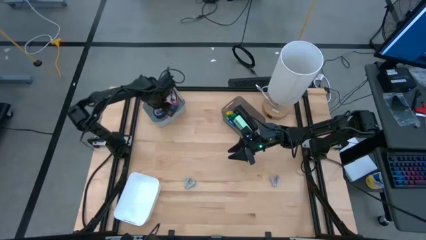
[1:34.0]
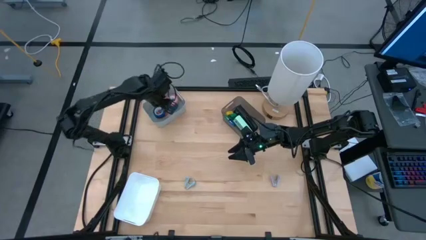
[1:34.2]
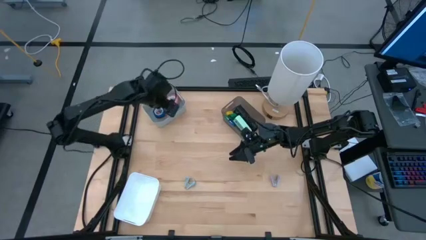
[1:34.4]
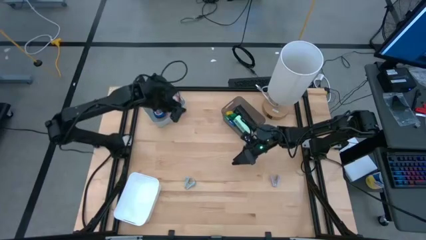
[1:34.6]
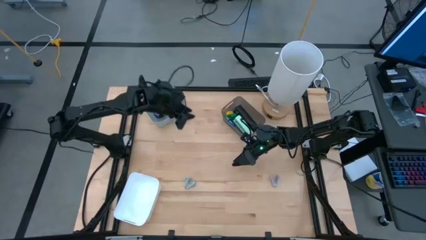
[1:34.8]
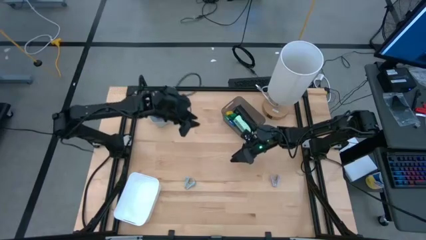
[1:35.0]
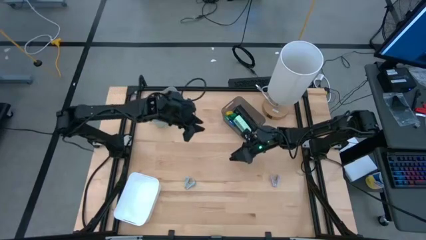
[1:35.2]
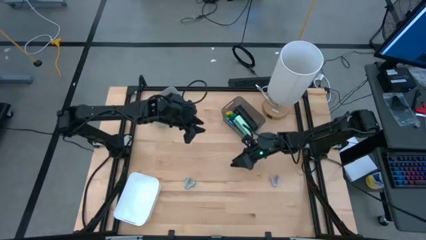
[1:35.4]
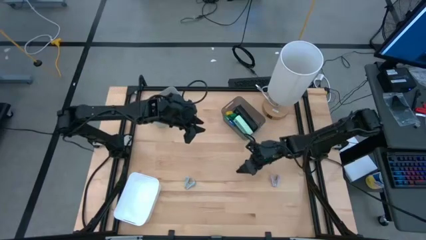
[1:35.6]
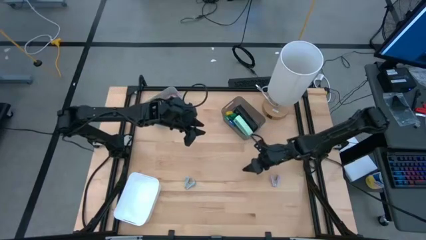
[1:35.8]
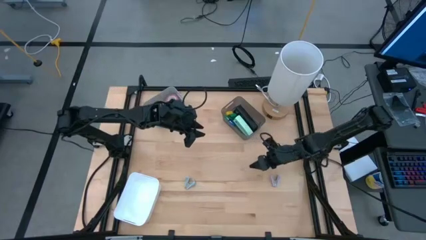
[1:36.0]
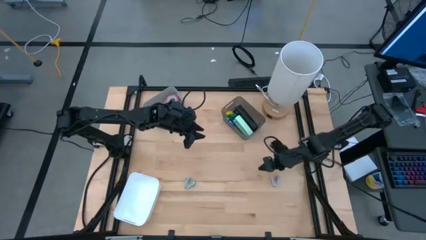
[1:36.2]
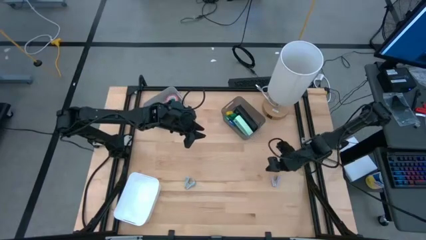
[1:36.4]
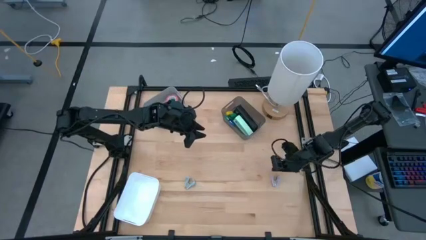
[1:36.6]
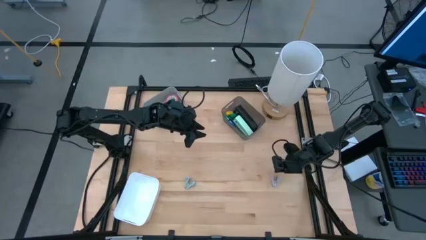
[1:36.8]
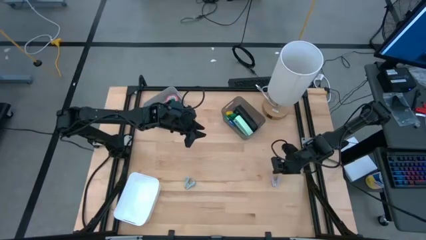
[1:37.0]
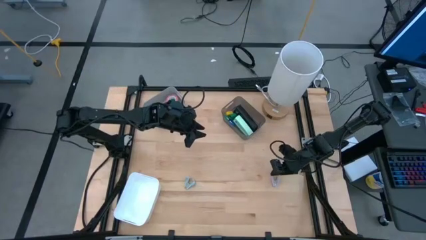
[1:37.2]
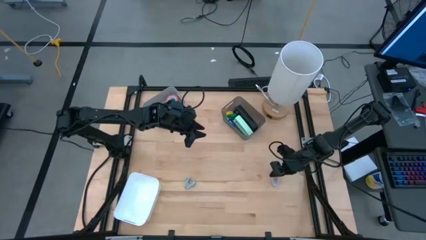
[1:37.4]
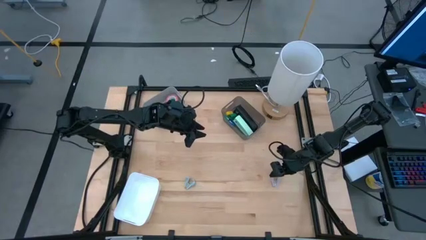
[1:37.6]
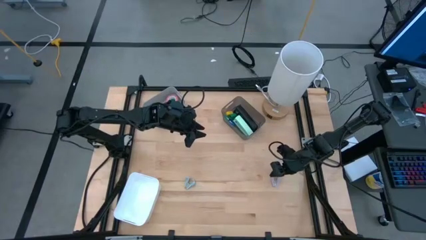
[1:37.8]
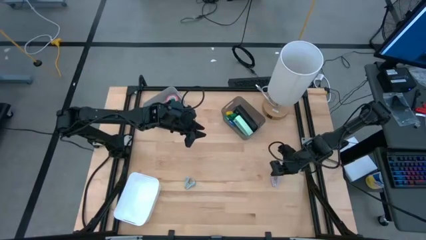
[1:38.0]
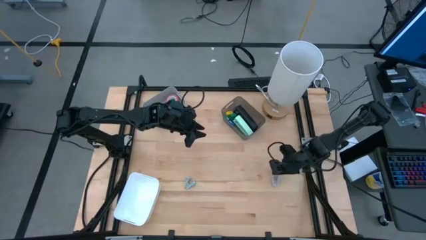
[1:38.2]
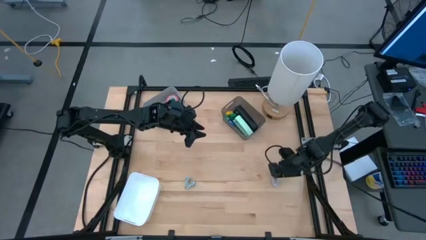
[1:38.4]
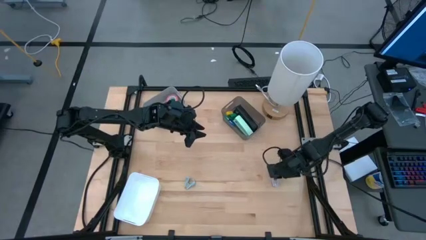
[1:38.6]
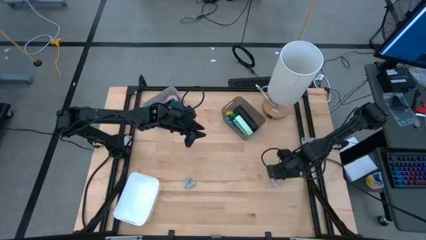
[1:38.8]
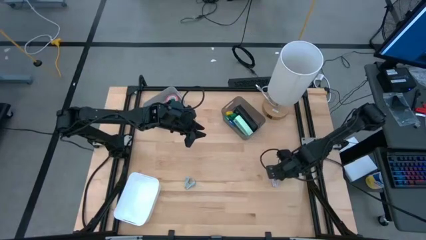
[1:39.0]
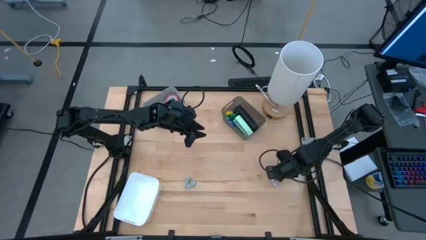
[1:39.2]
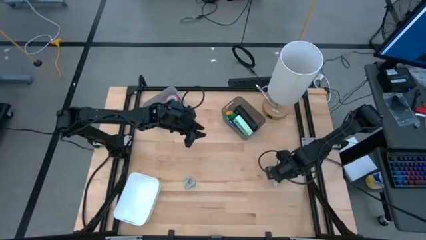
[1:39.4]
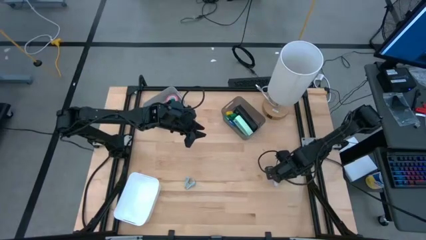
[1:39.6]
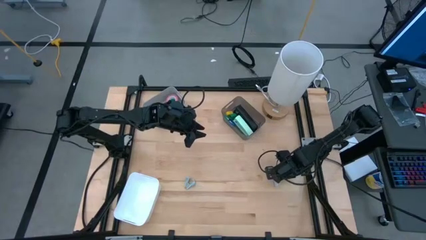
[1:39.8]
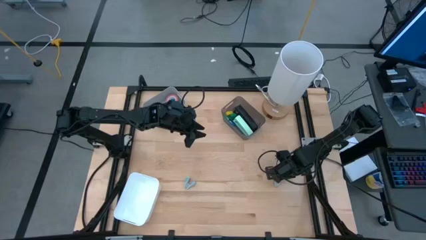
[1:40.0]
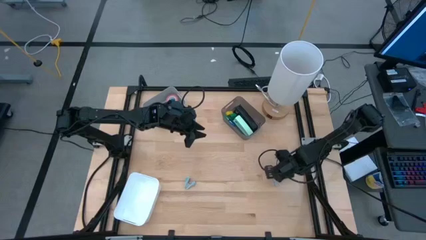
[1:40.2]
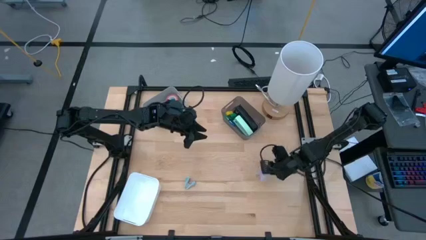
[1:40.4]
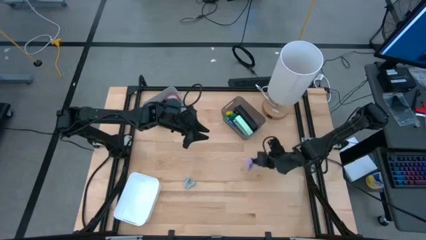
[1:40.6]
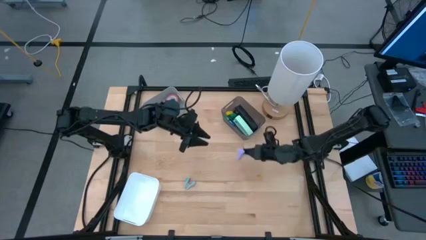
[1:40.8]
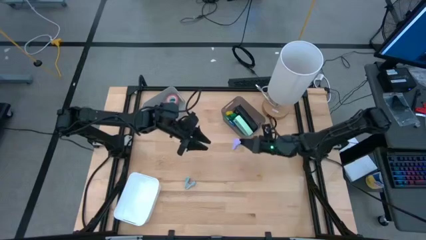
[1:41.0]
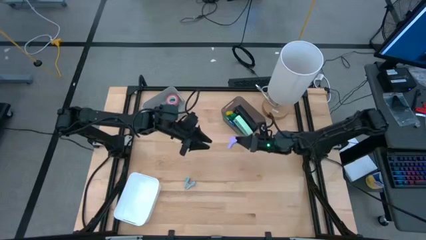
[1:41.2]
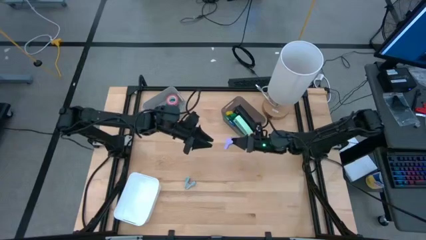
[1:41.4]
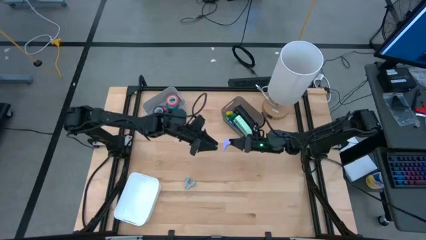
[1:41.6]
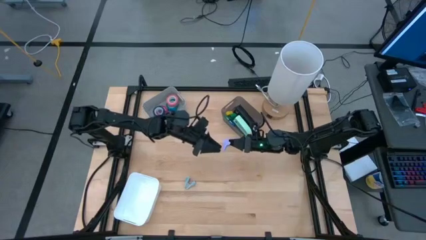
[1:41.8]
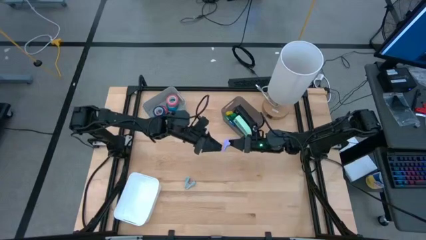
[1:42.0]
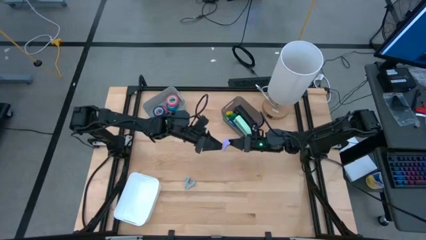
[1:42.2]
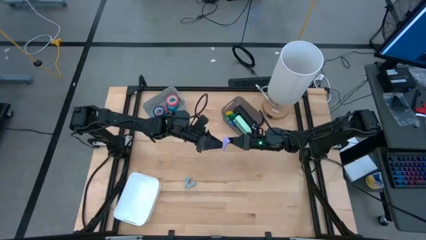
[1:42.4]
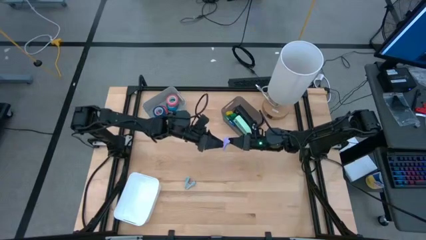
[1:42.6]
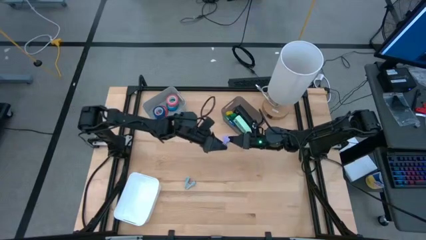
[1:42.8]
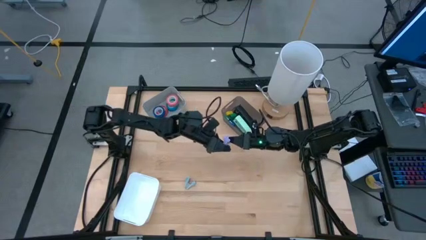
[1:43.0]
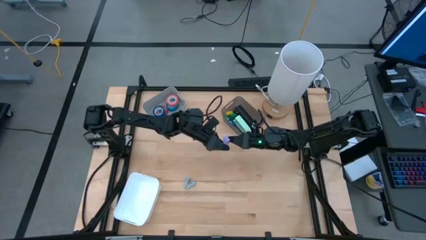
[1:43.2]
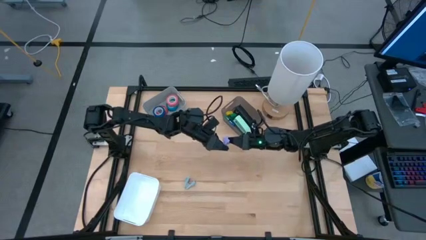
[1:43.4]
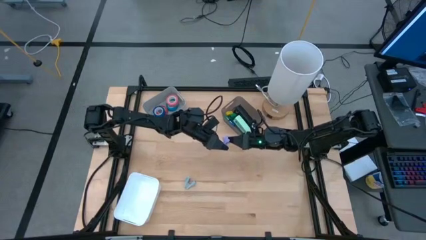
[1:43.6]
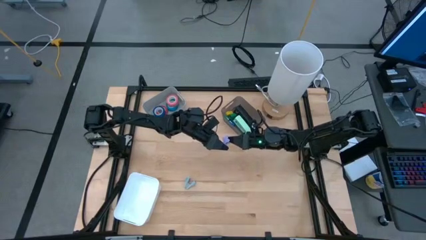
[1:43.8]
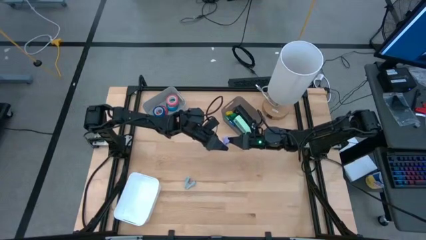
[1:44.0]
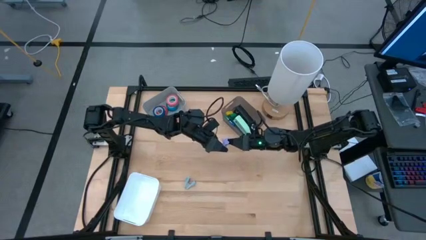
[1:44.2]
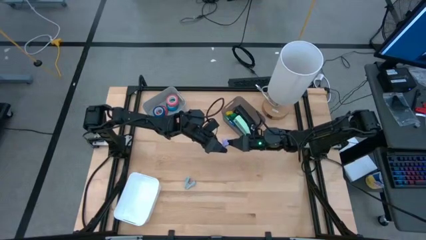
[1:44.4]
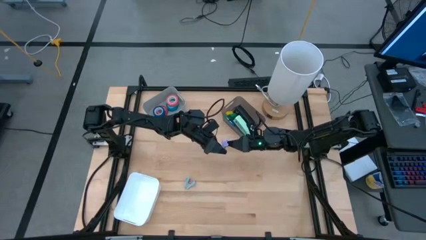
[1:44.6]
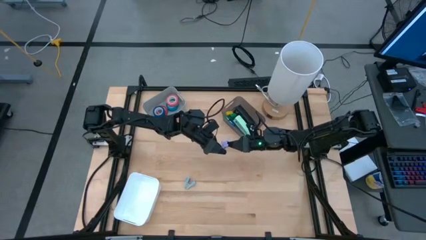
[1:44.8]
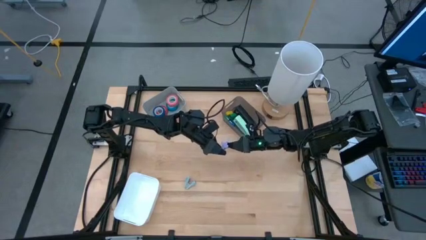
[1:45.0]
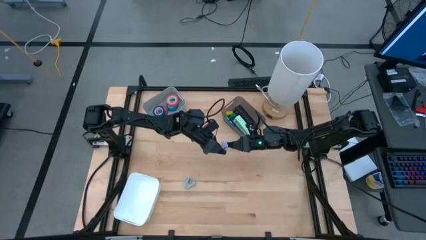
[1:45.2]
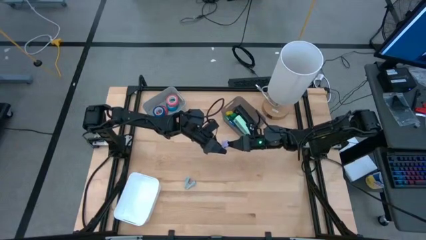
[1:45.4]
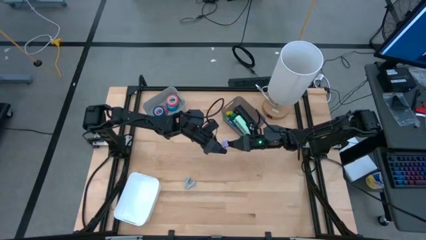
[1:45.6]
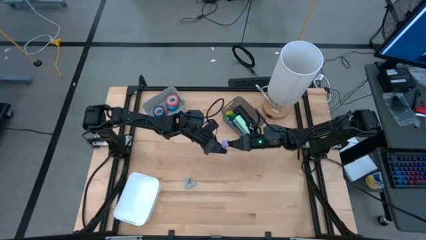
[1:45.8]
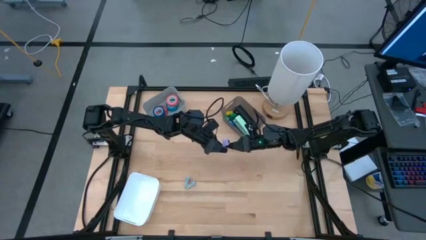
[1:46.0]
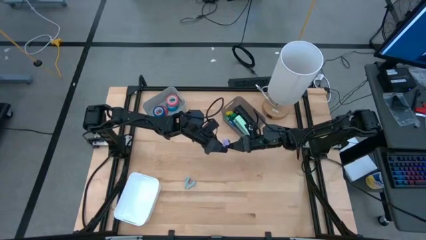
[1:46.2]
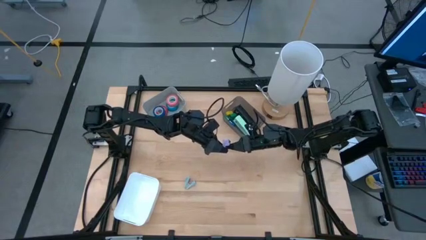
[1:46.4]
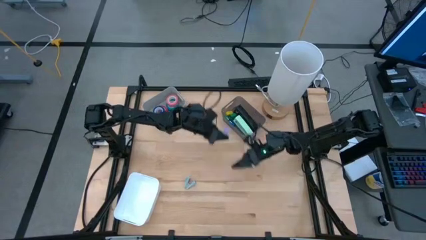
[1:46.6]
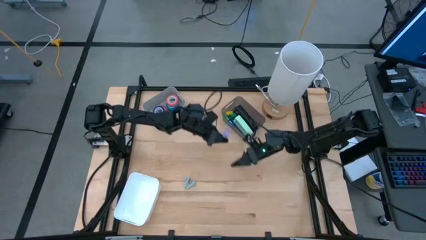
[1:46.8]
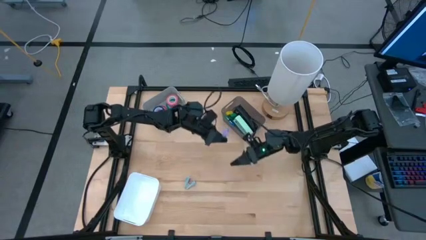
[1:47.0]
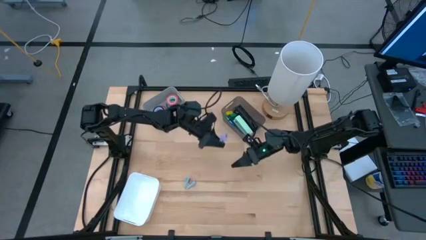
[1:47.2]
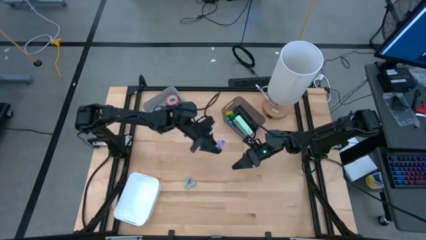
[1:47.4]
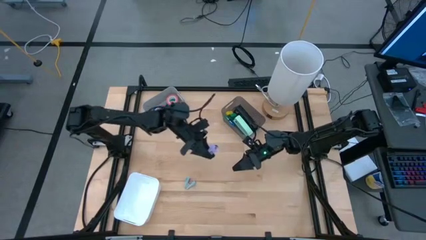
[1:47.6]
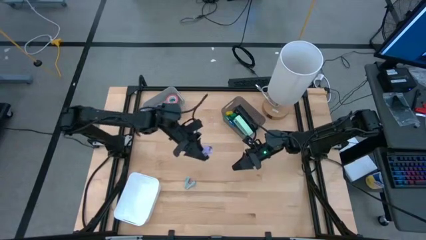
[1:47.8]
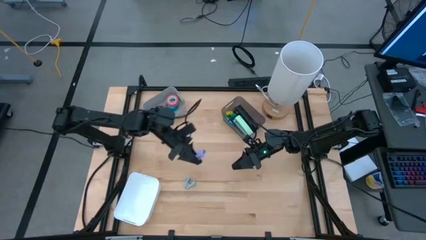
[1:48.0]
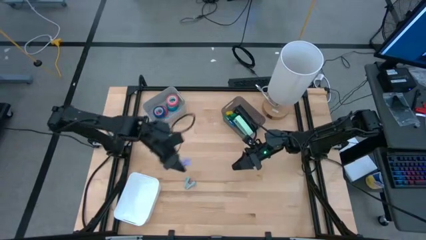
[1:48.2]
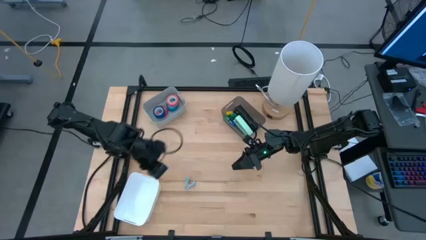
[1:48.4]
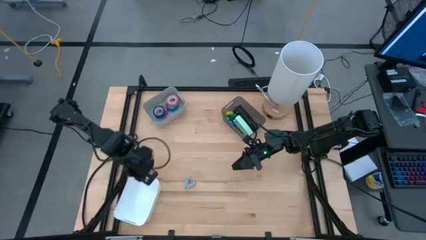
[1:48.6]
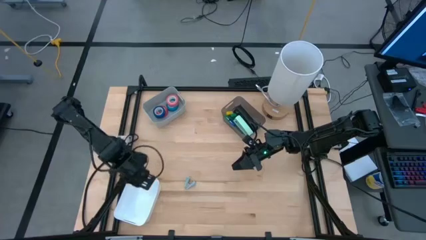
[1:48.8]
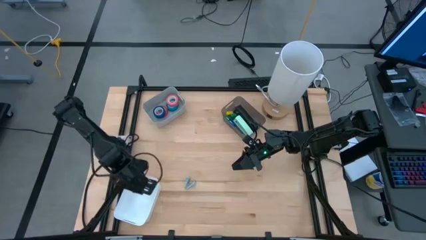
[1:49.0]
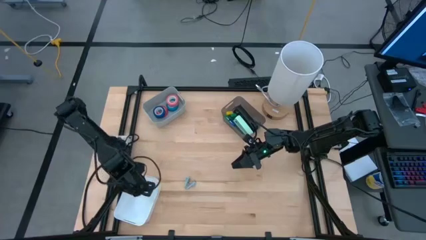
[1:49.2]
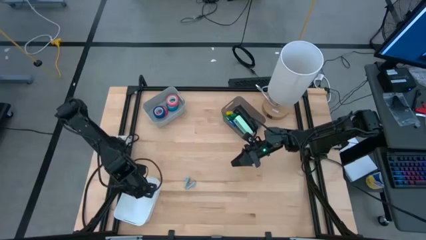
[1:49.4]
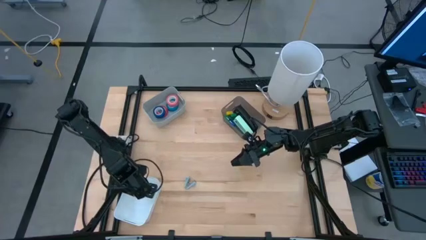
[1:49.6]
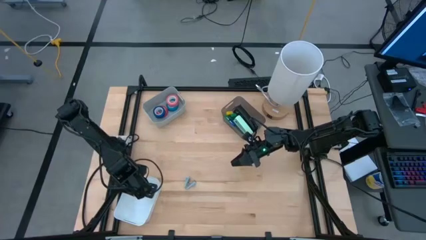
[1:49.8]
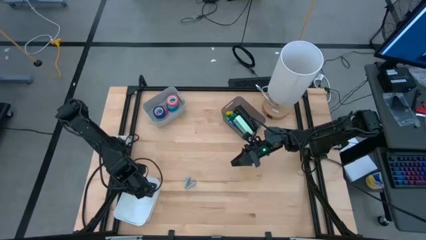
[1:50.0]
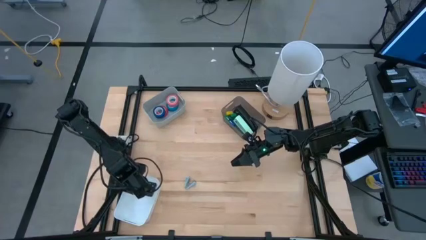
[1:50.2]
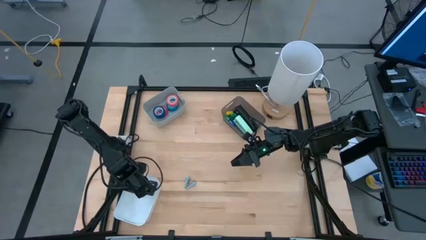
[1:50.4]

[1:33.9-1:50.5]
Task: Pick and place Stapler, Stapler remover, tape
Put the light purple staple remover into the white bin
